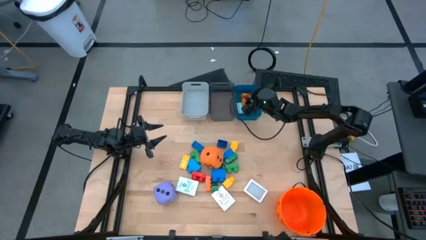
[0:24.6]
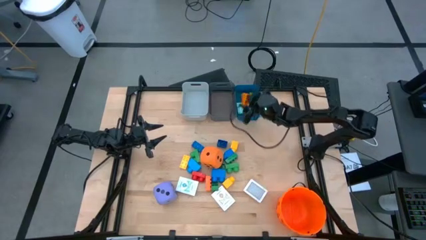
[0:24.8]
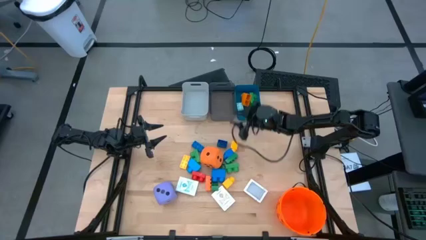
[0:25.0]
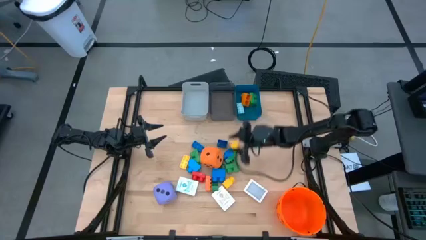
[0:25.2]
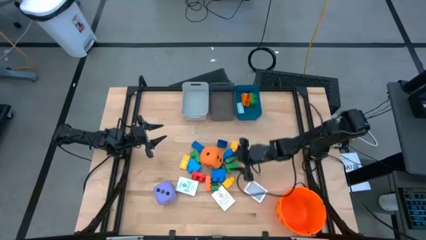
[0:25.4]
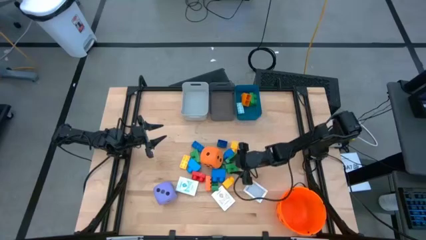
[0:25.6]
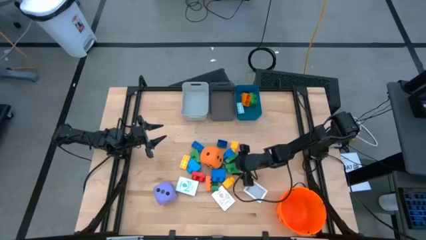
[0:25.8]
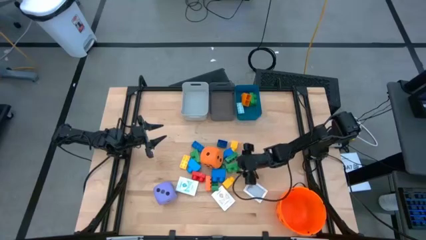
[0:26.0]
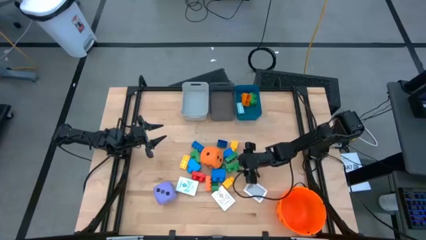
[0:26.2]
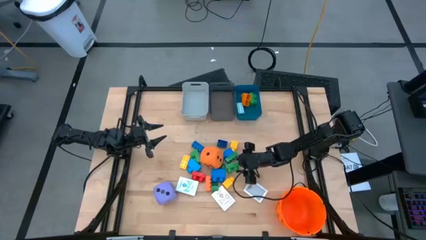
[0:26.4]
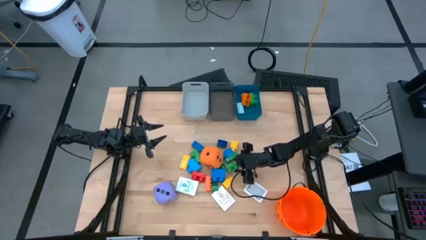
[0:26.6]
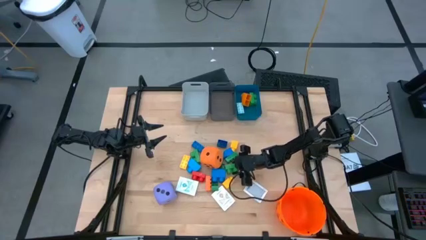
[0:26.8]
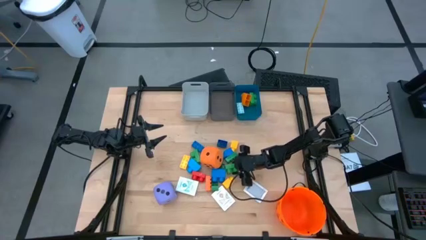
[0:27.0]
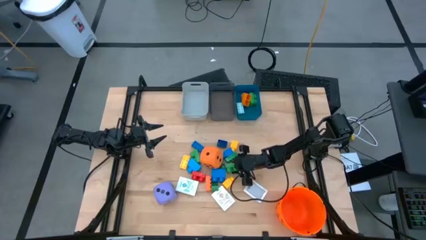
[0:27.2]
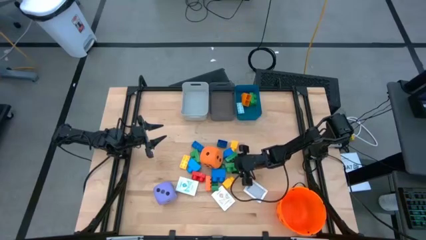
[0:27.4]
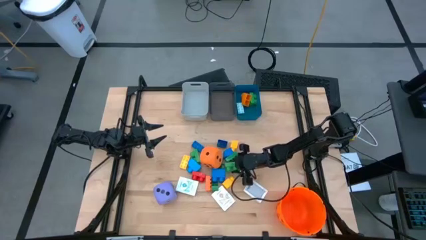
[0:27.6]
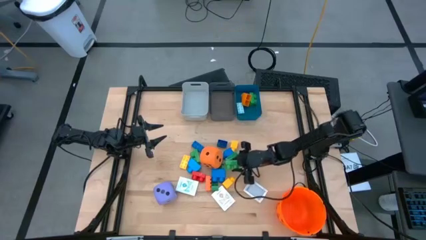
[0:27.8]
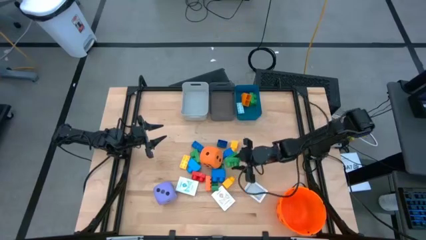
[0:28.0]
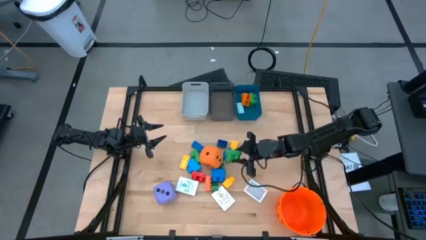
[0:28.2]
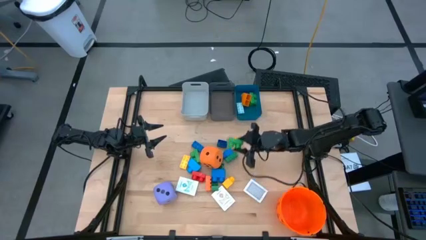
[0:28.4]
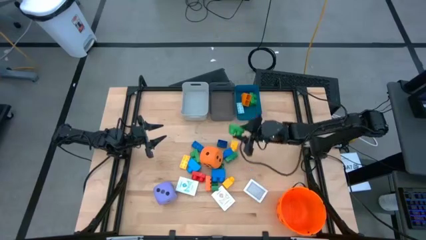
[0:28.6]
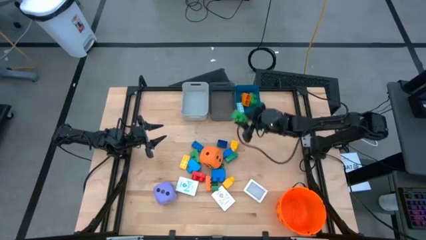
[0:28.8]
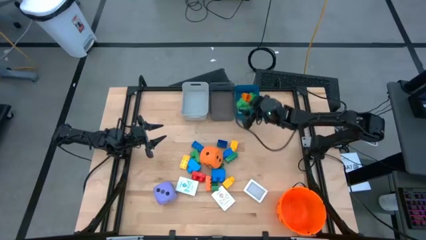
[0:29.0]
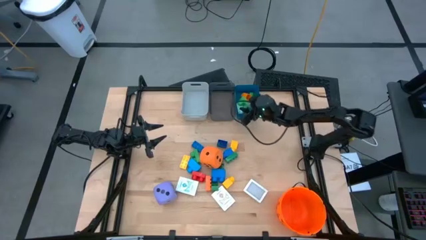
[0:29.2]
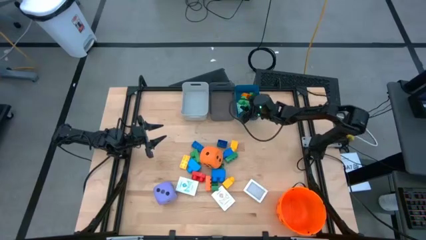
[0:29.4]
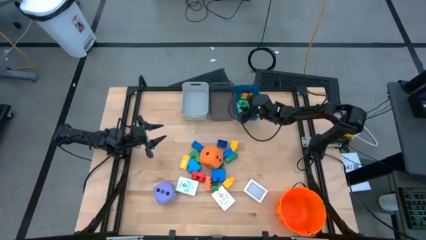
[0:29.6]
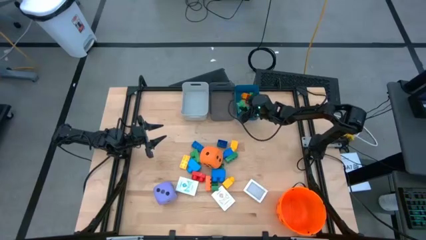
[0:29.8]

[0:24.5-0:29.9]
Task: Pick & Place Toys
Put the green game piece into the blue bin

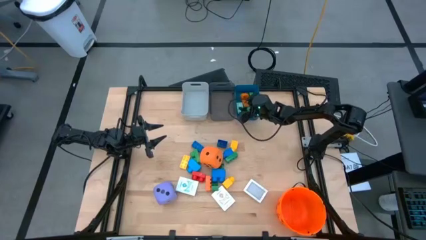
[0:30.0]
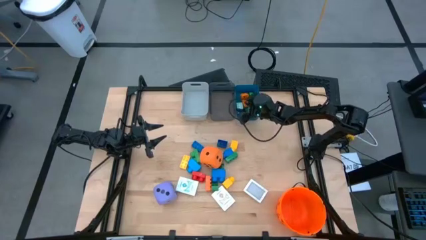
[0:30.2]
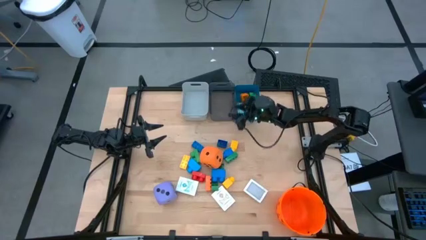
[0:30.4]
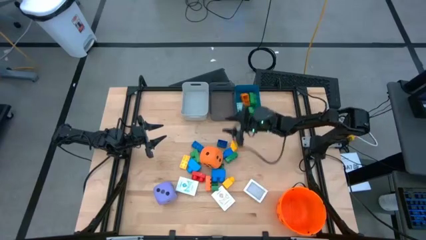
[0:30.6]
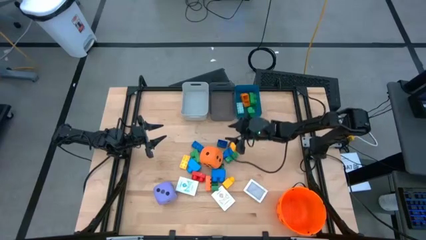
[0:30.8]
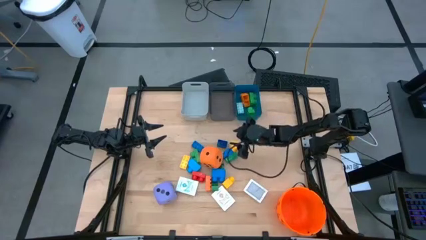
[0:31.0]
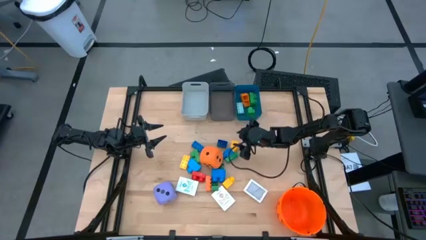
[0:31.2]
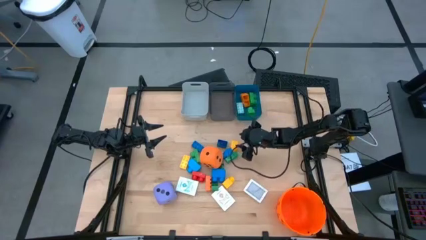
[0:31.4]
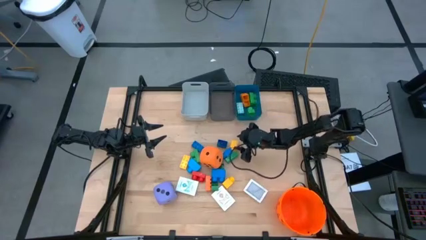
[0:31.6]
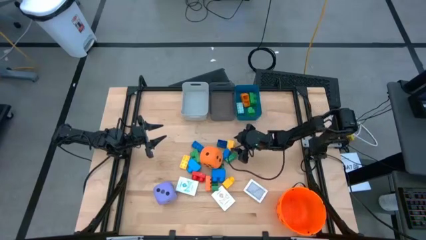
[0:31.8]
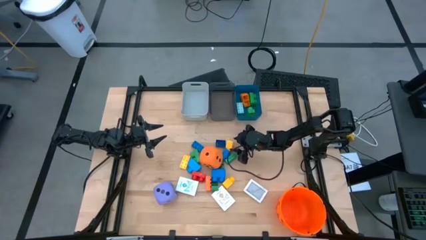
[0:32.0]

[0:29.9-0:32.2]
Put the yellow game piece into the blue bin

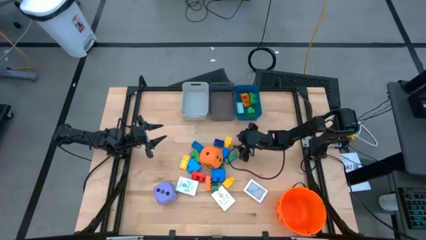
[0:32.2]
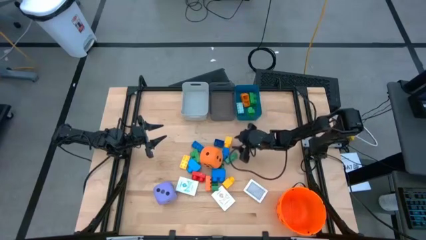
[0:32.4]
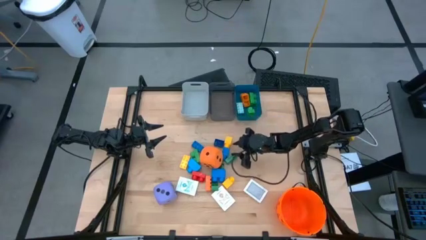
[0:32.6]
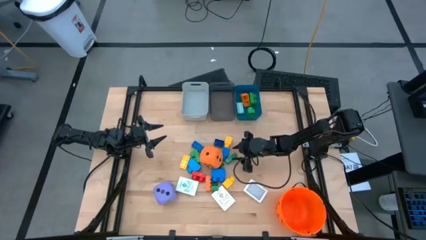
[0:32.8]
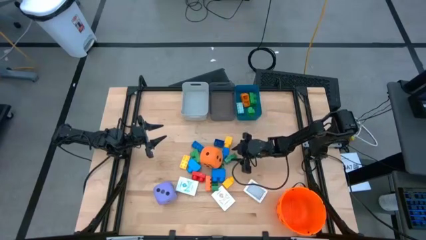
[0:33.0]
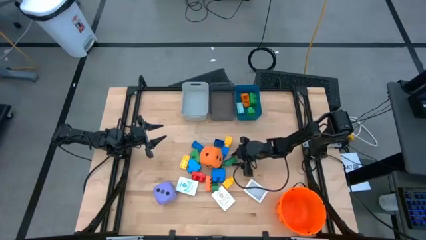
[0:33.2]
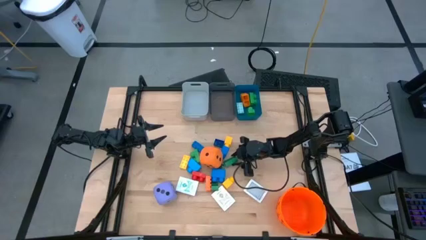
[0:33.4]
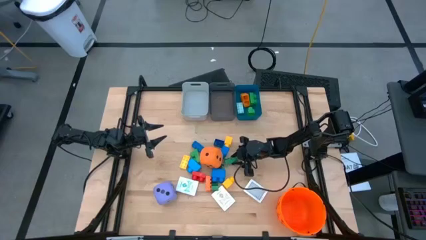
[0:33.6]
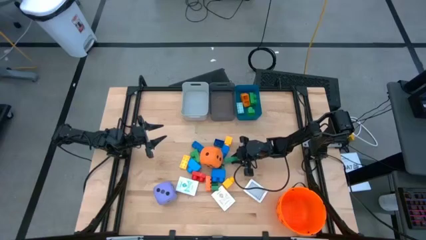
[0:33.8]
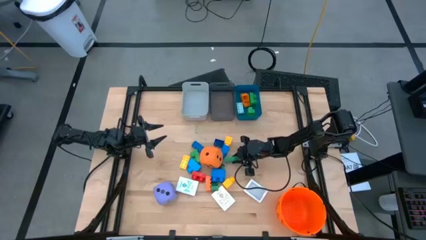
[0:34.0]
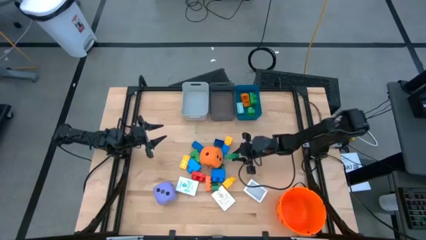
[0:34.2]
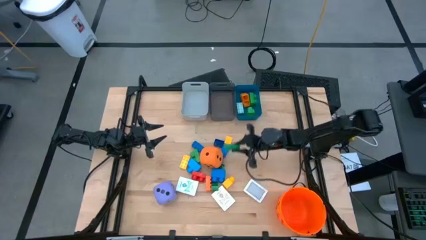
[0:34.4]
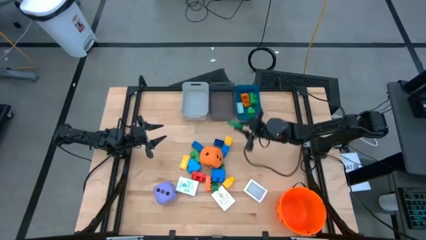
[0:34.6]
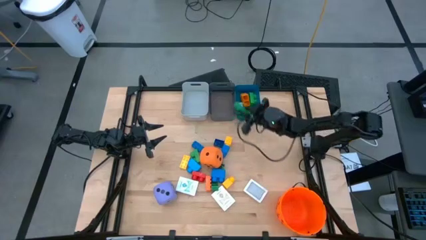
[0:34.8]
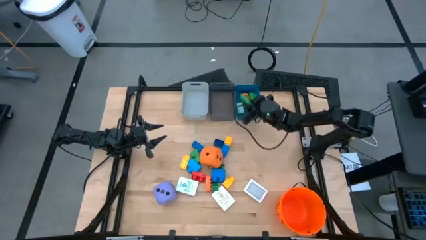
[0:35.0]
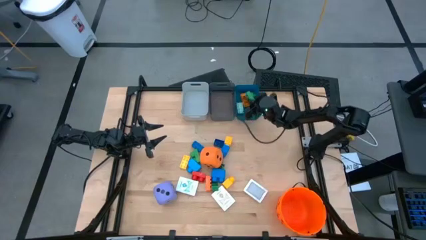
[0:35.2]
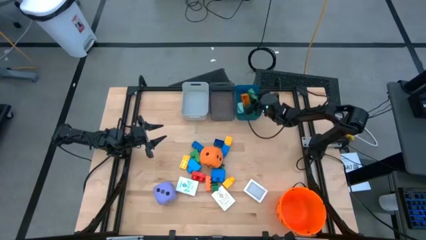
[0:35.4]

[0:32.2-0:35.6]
Put the green game piece into the blue bin

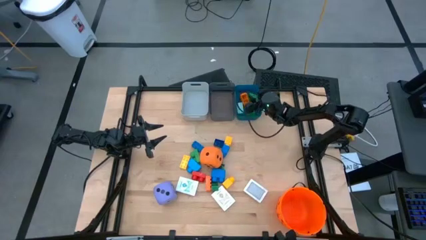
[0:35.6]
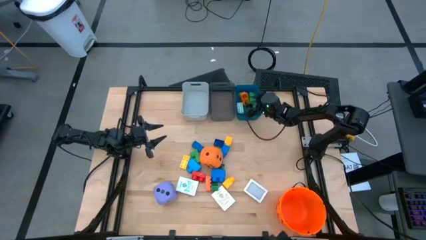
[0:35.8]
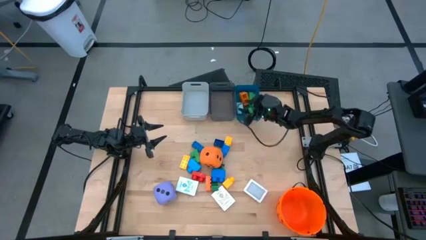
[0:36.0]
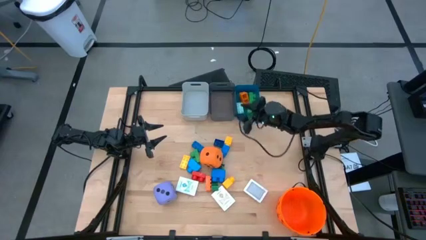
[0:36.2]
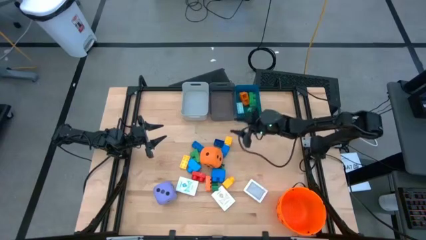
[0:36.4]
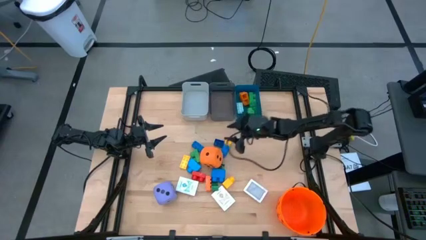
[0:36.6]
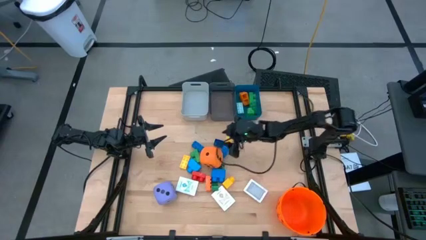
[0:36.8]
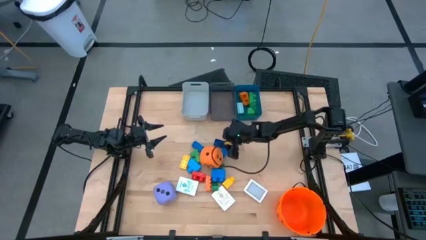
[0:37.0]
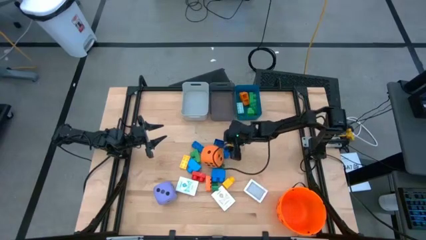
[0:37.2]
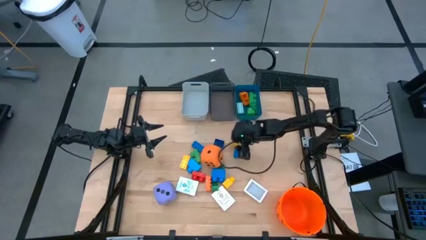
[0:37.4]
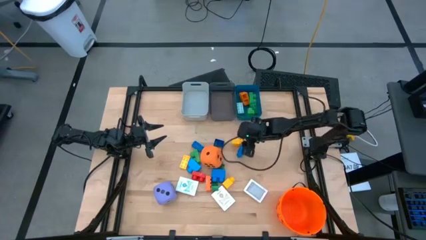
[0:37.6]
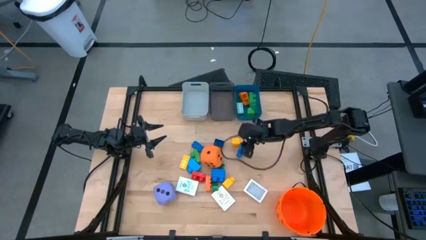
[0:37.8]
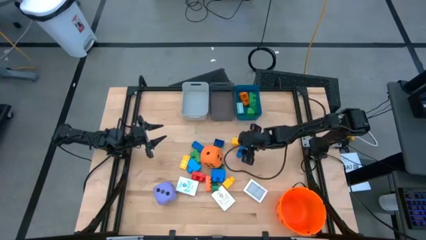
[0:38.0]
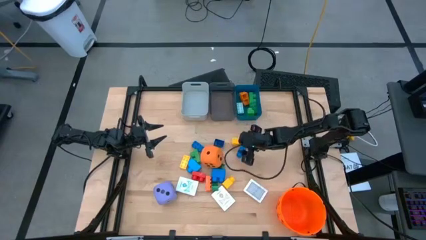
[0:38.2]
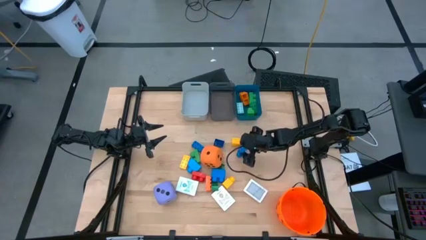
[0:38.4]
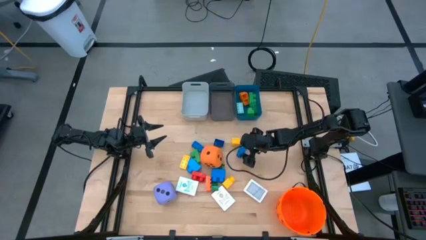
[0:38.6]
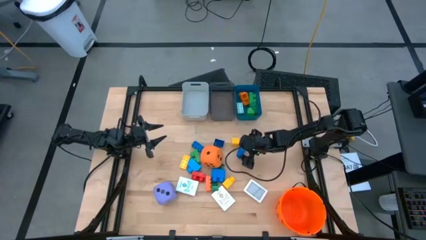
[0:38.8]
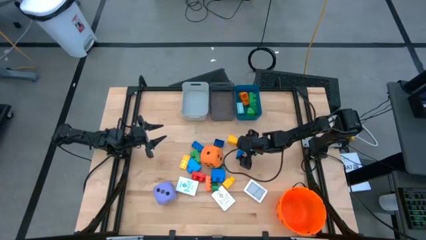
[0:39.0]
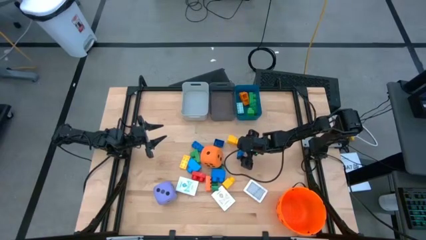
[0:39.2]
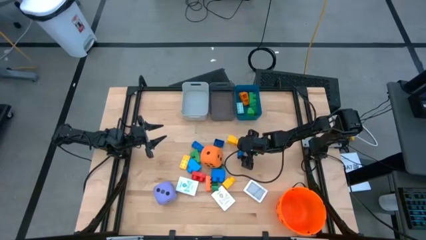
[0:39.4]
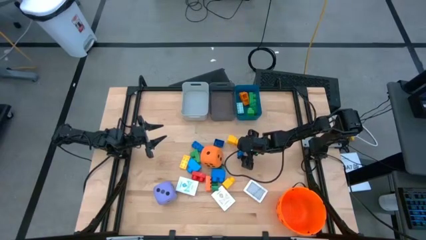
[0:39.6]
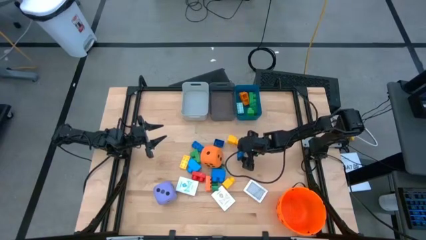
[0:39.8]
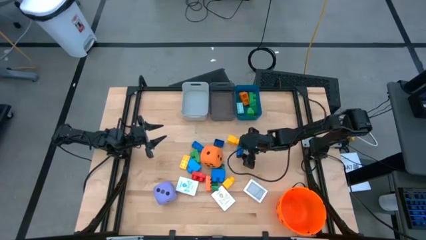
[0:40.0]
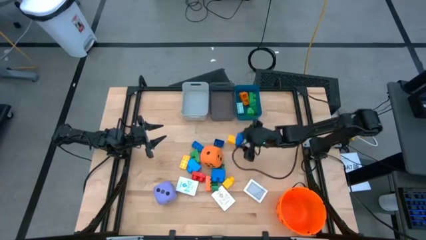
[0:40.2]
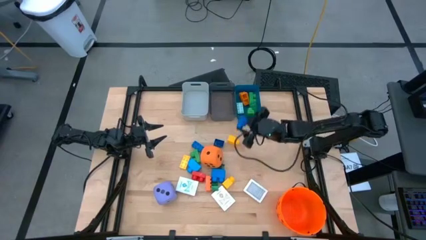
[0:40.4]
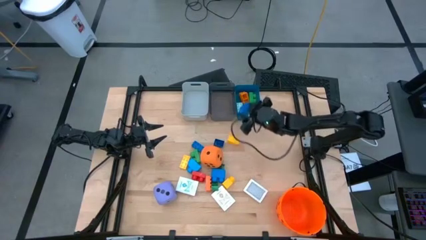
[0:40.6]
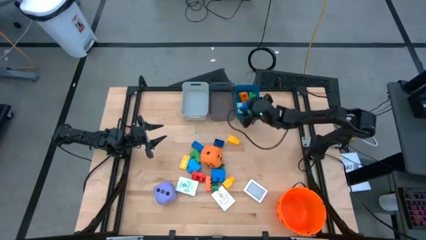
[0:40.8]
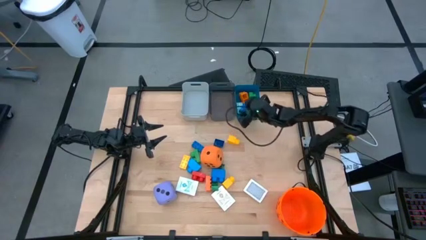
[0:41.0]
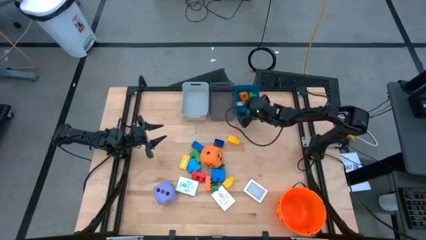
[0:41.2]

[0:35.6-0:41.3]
Put the blue game piece into the blue bin
